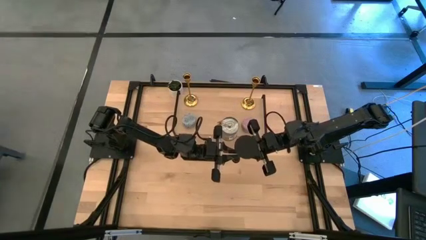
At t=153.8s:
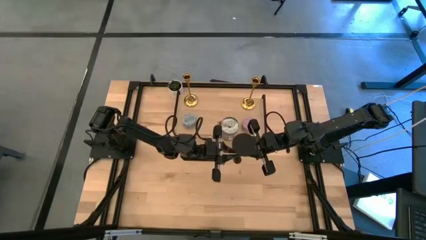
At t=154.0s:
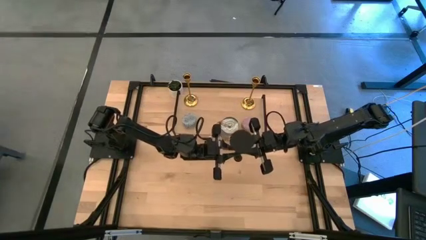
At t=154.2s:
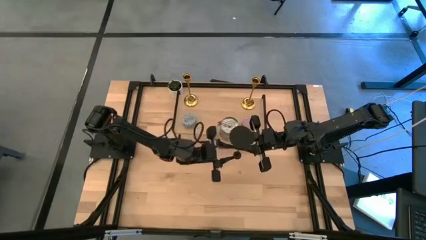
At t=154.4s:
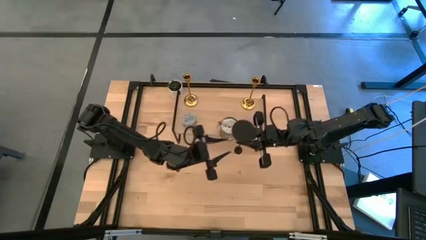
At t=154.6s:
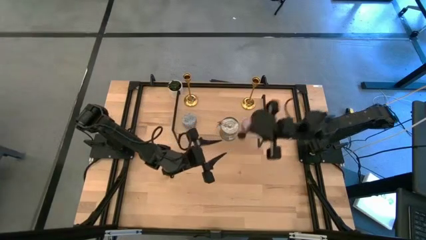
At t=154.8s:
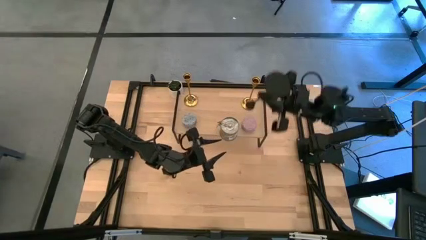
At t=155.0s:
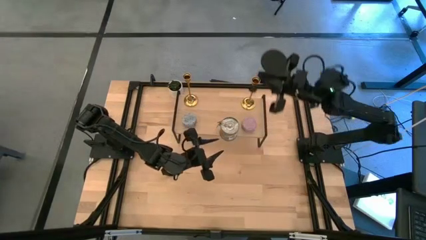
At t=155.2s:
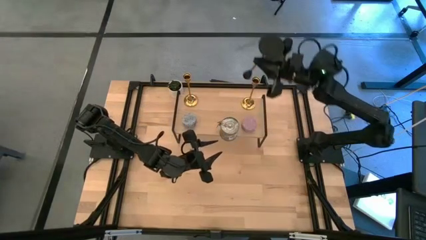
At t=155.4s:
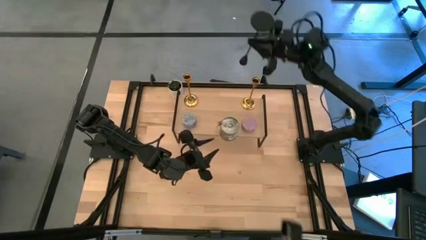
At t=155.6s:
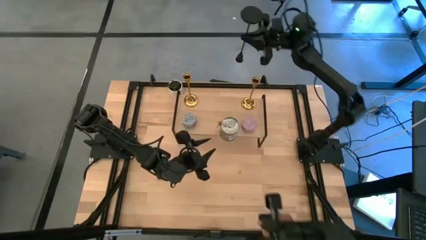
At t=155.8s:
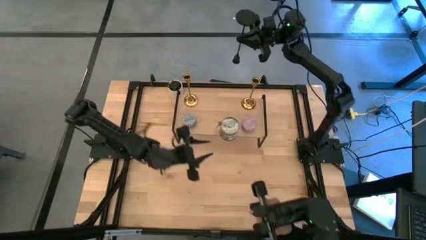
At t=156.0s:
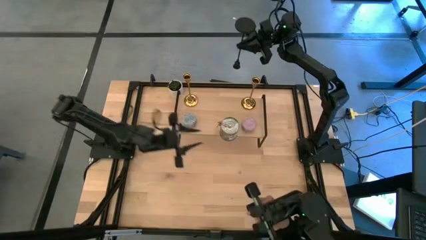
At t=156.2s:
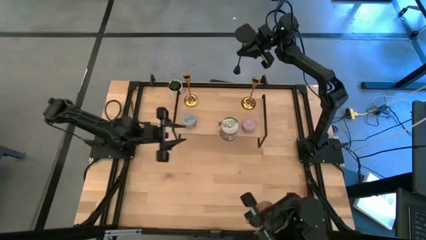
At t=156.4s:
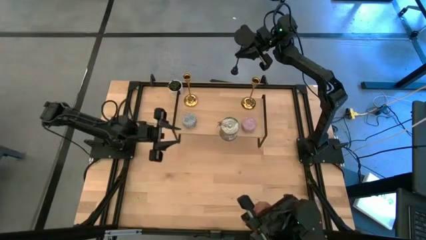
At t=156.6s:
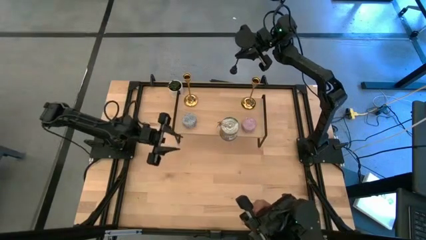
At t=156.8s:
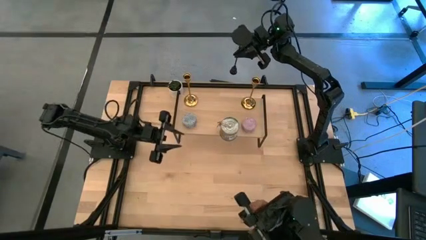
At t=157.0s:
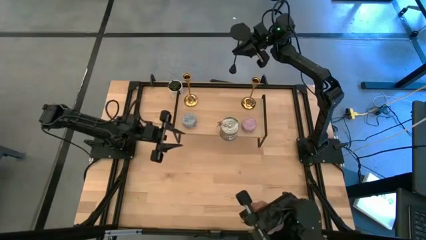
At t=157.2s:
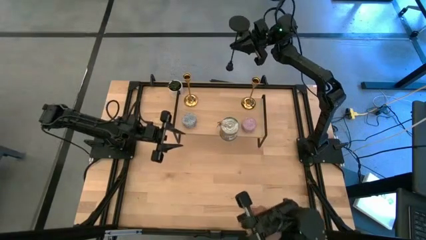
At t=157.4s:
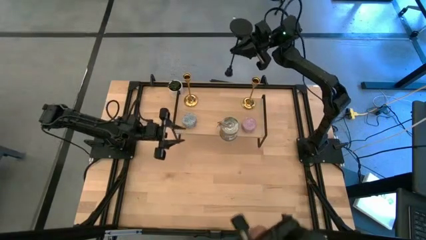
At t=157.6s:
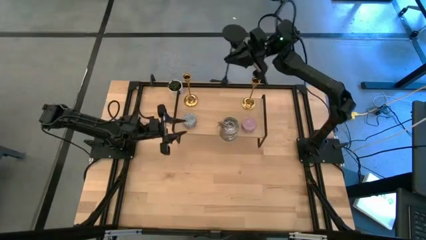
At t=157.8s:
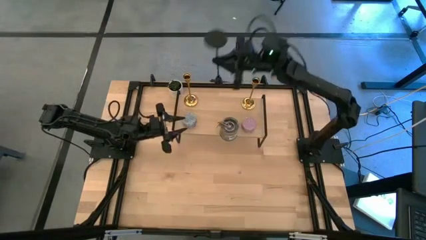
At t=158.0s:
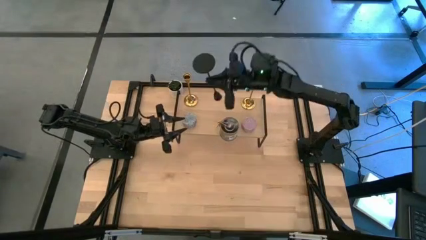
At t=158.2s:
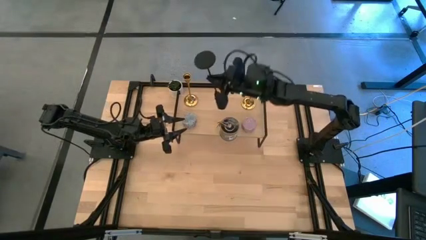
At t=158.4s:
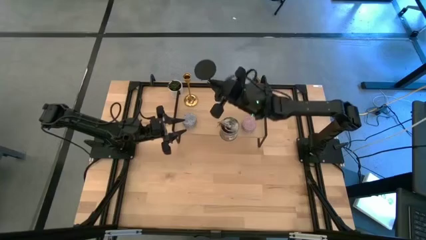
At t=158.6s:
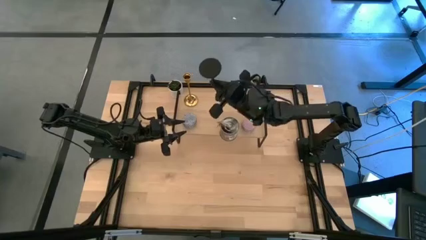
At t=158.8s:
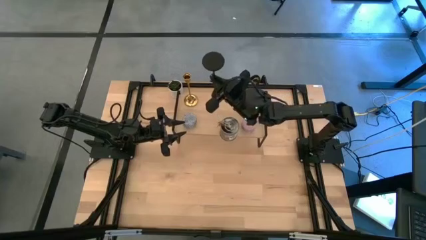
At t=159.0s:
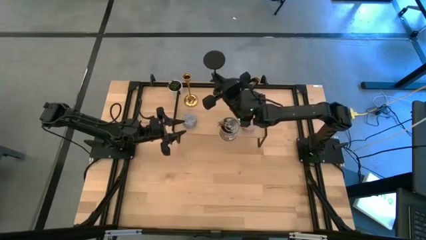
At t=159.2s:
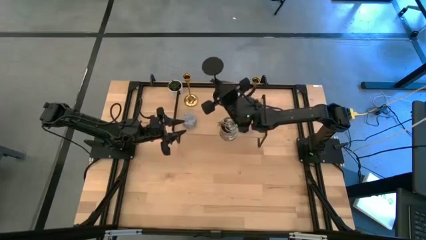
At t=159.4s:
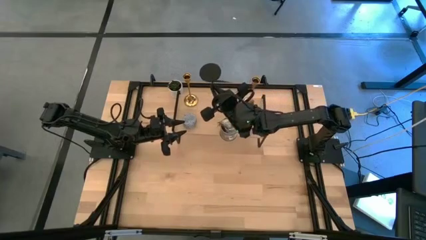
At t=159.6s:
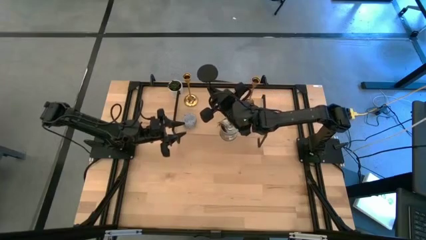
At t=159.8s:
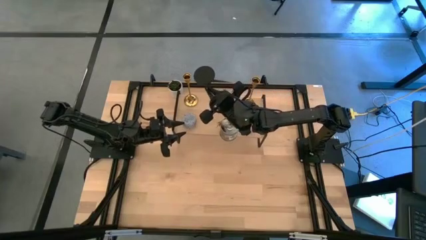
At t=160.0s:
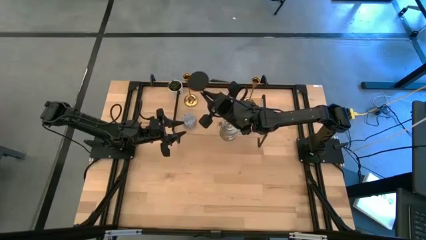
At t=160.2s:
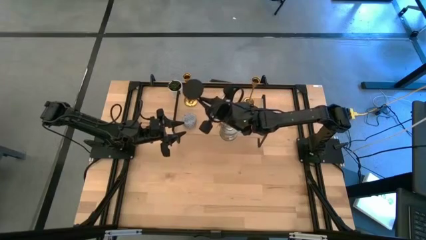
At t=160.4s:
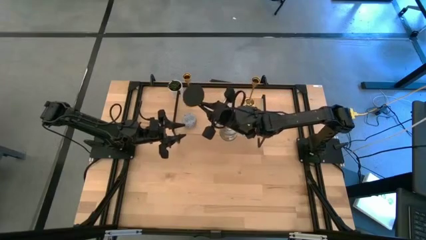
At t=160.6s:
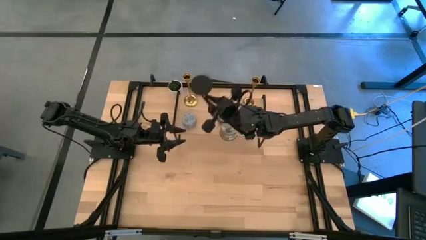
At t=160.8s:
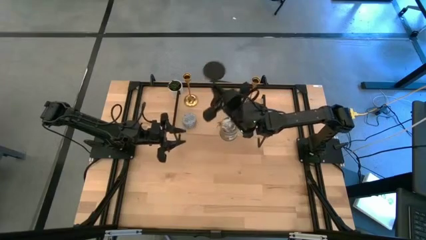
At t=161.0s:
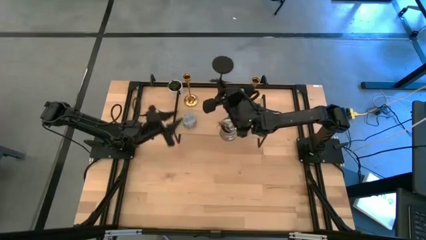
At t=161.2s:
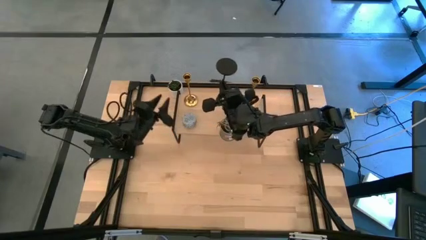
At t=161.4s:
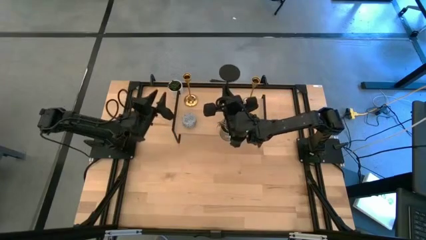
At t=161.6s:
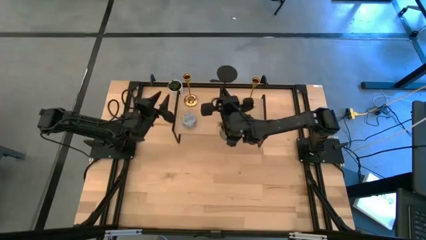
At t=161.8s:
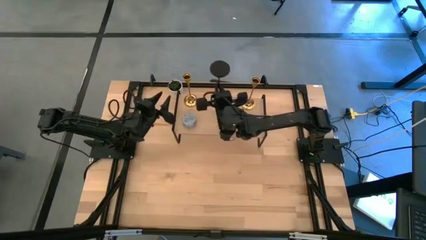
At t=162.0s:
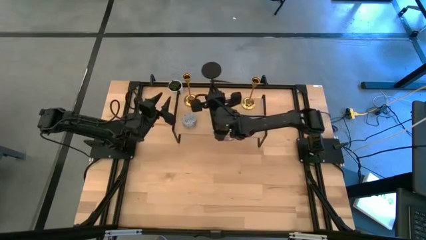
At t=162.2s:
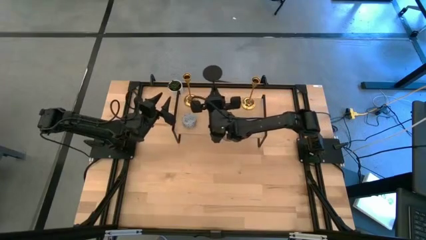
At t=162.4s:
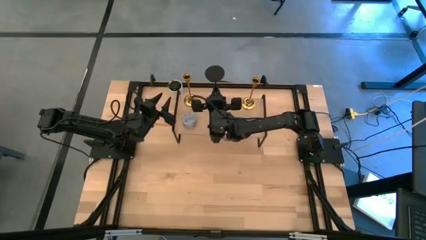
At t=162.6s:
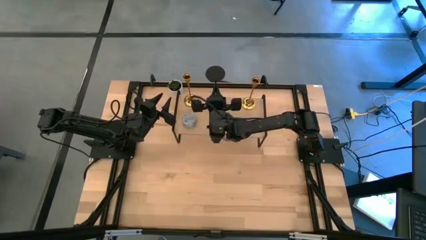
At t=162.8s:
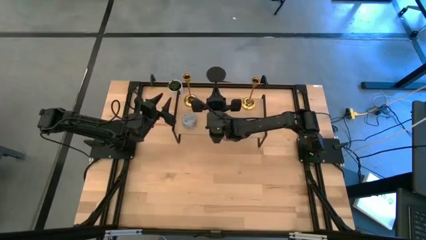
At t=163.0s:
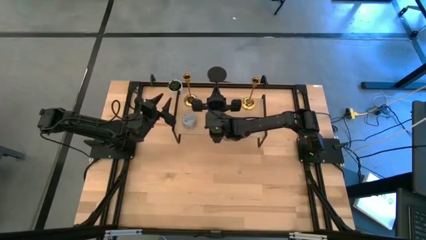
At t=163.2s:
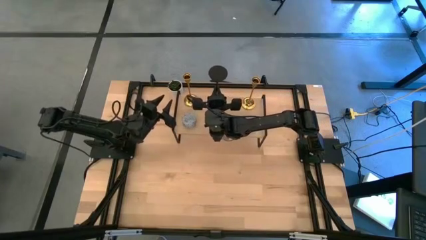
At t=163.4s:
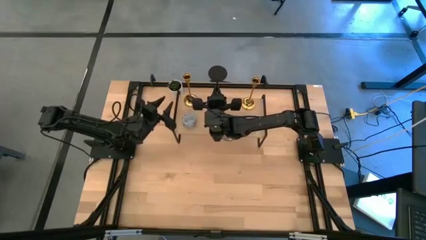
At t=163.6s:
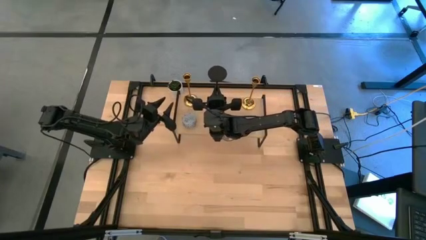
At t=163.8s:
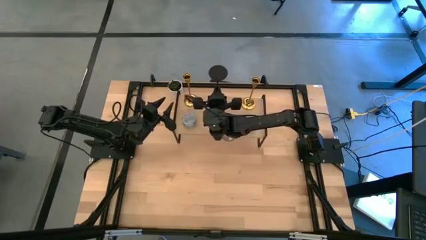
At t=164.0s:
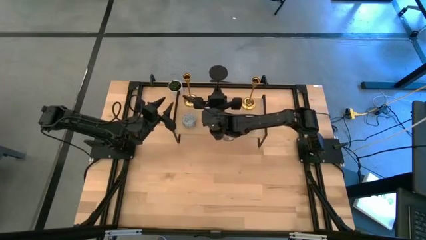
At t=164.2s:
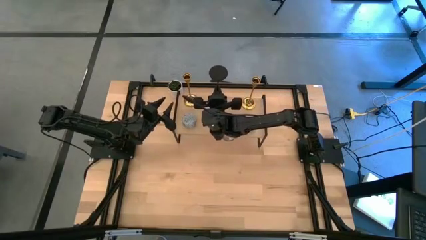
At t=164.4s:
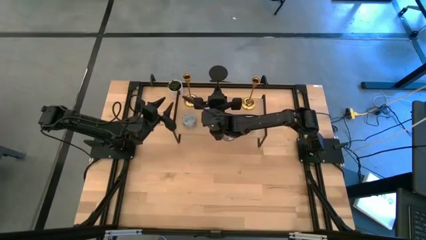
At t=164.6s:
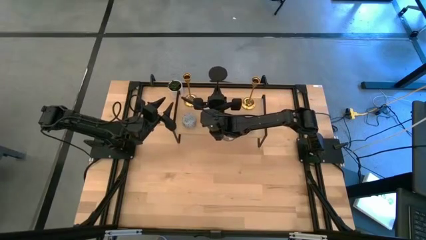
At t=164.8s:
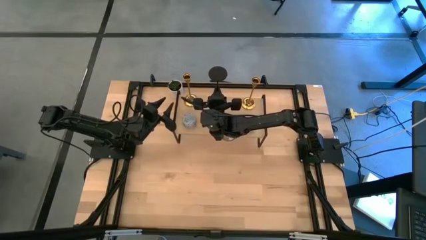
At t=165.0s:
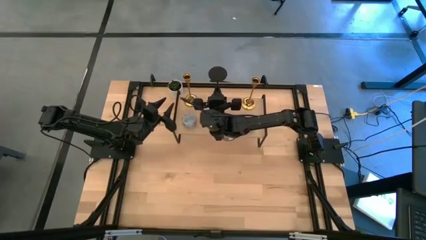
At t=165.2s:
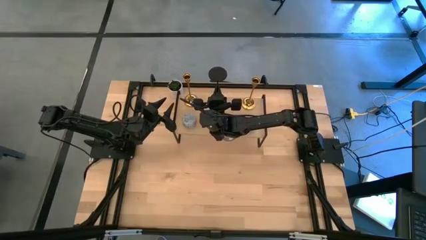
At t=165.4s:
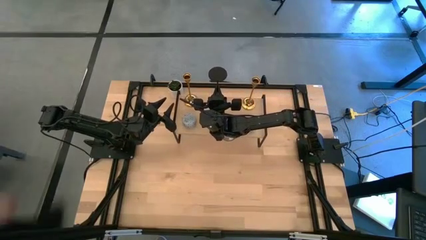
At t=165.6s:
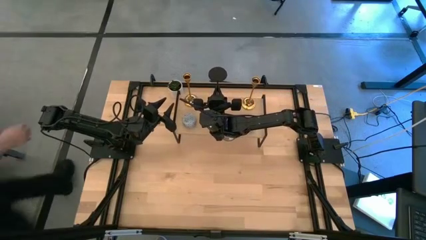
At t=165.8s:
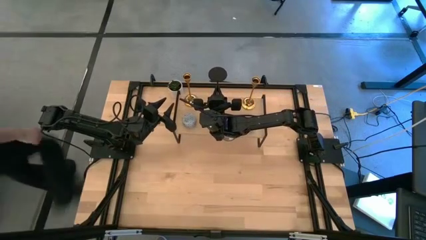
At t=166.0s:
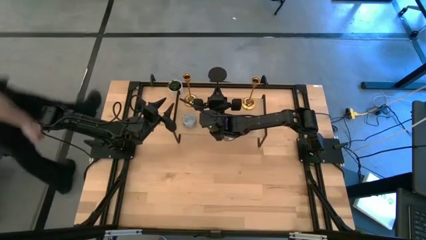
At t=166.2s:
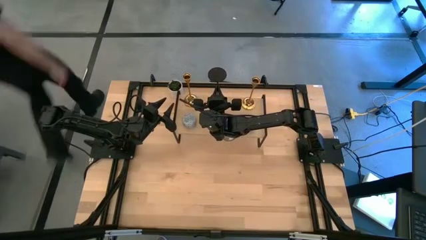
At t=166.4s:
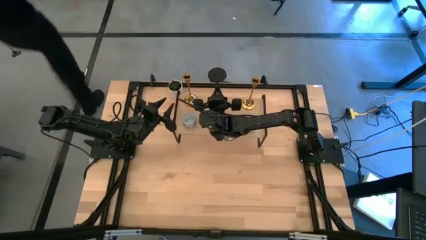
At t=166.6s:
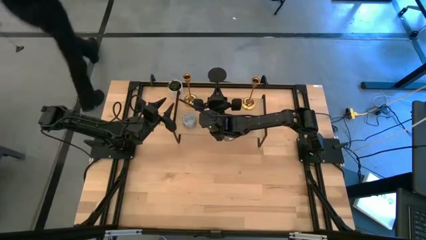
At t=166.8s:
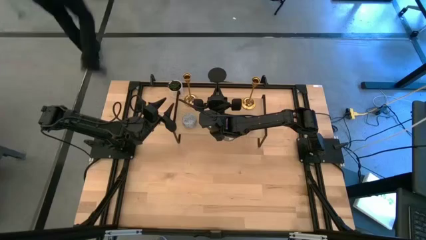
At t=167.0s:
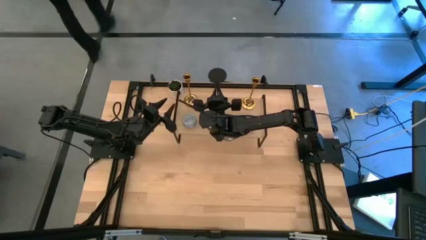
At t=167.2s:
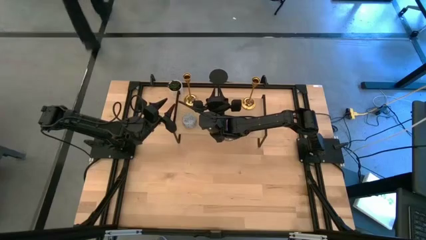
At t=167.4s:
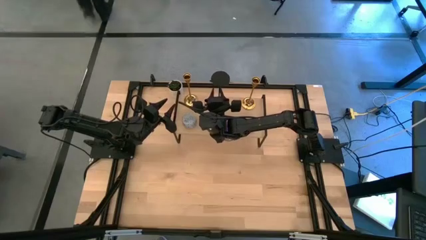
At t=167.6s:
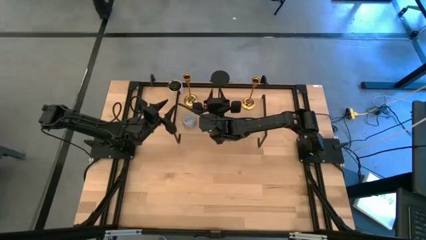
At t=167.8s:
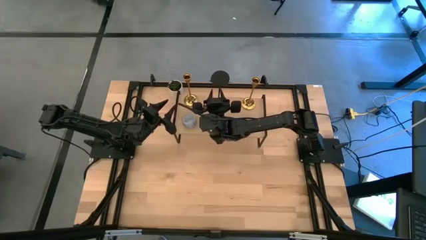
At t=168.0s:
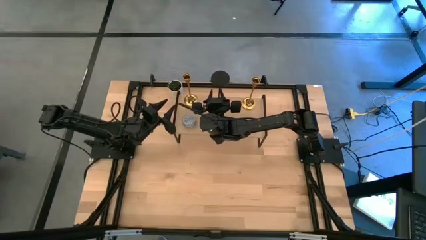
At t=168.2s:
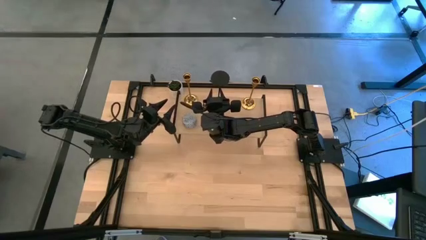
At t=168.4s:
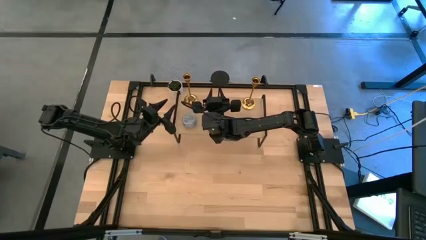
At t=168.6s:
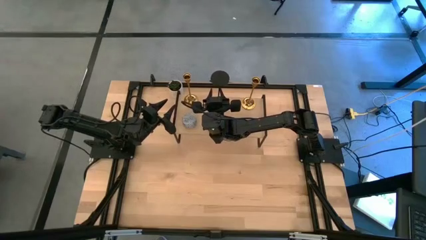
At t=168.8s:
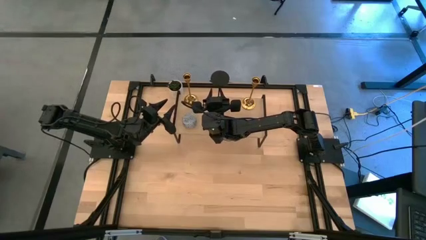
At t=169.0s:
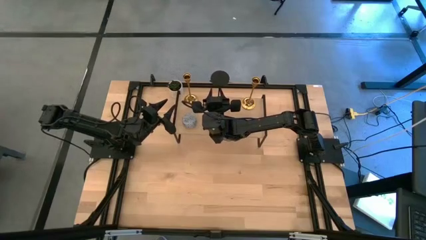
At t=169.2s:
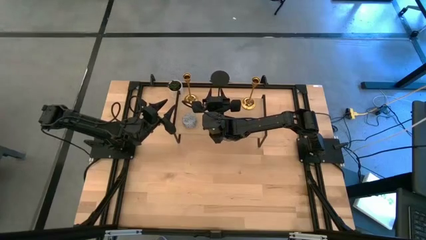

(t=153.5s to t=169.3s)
Task: Pick & Place candle stick holders
Put the black candle holder on the shelf
